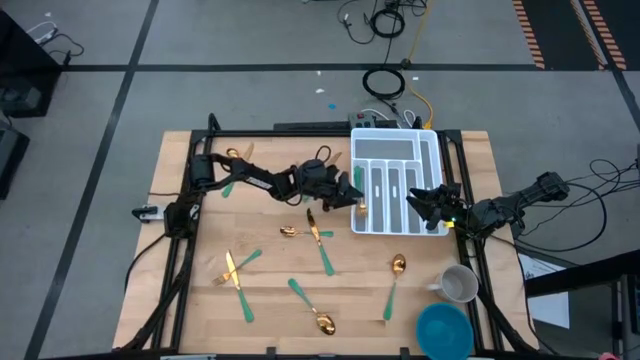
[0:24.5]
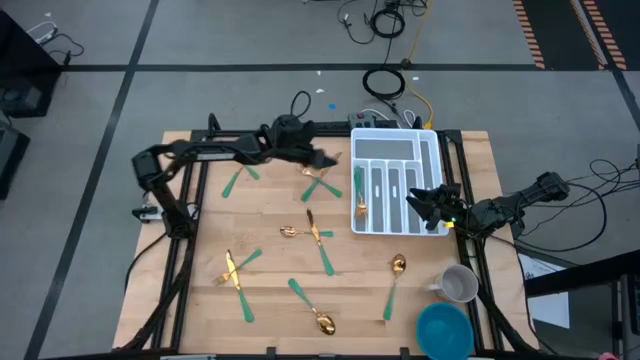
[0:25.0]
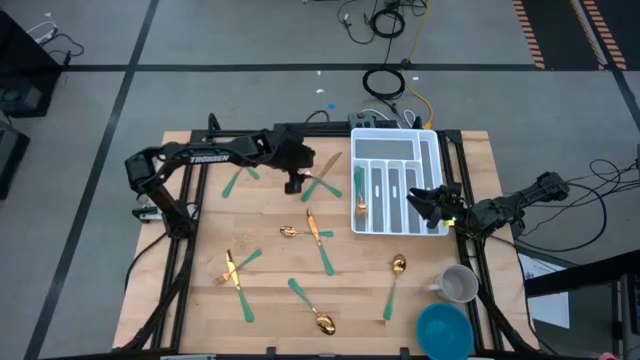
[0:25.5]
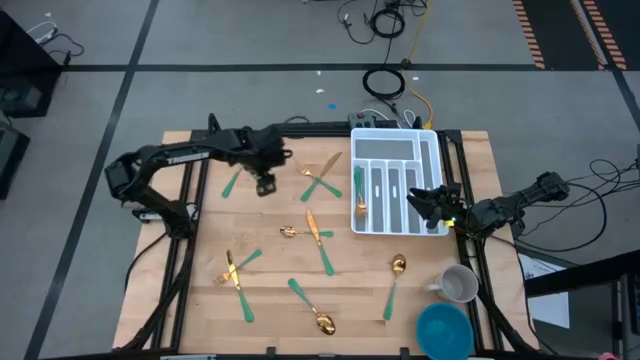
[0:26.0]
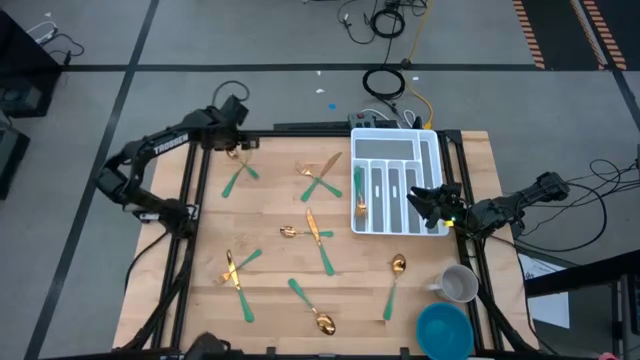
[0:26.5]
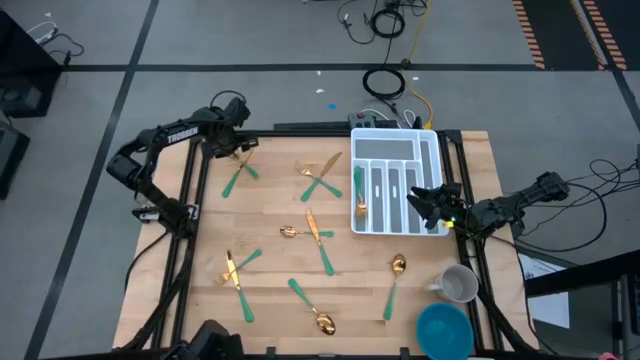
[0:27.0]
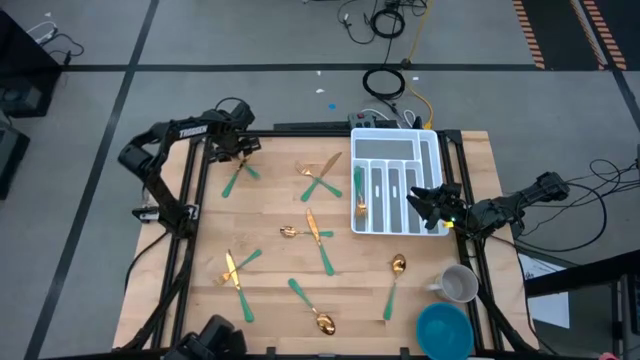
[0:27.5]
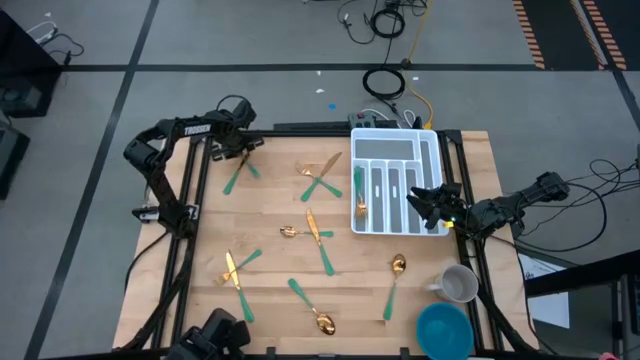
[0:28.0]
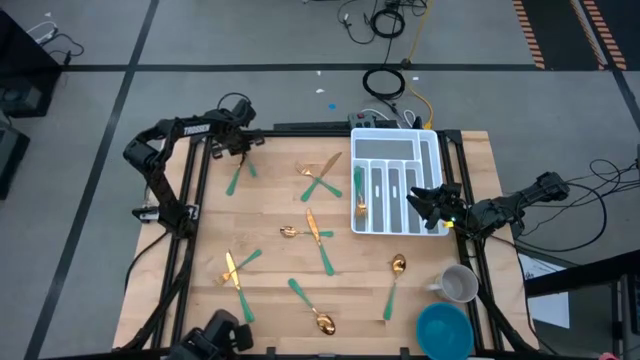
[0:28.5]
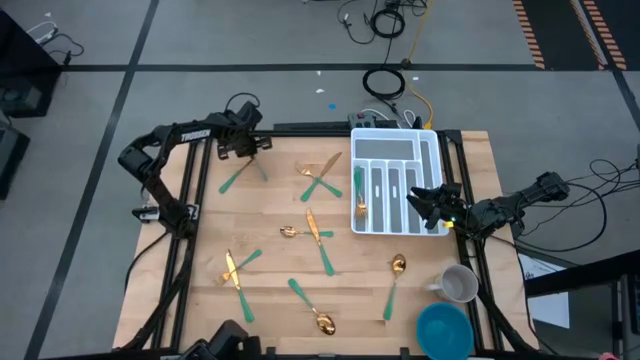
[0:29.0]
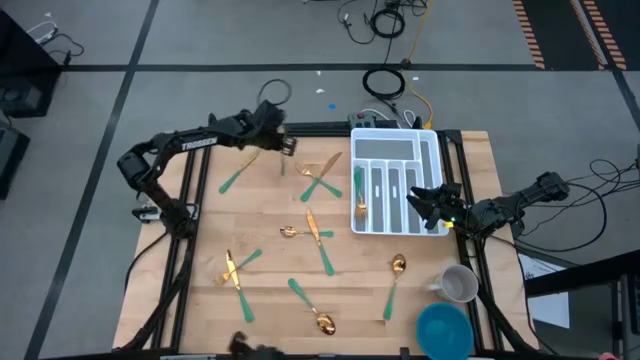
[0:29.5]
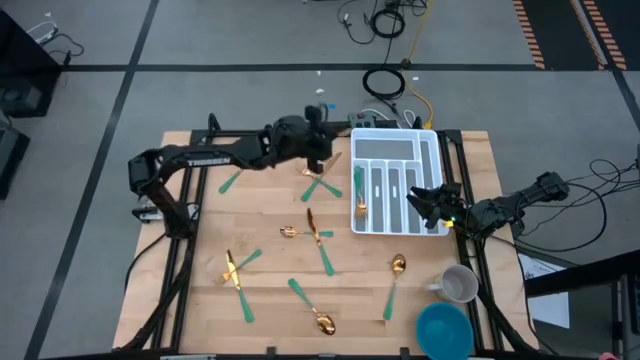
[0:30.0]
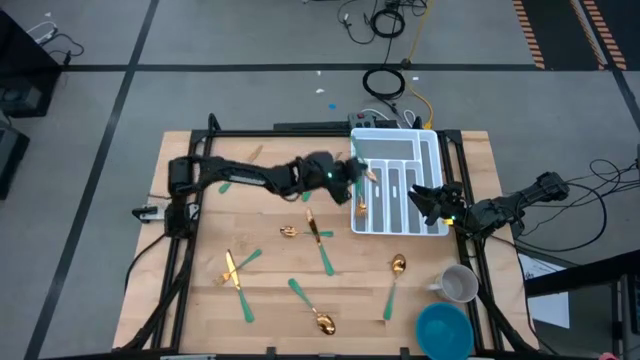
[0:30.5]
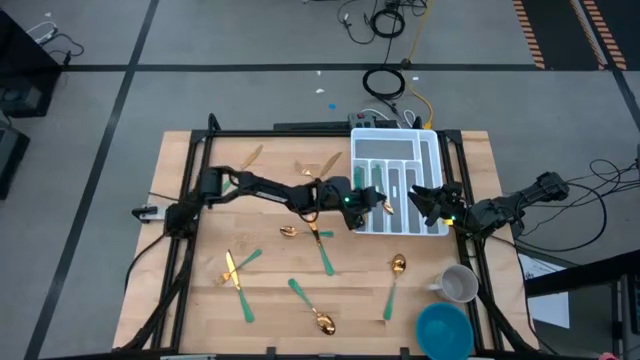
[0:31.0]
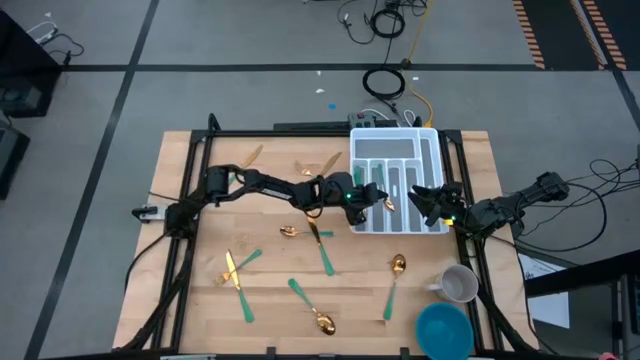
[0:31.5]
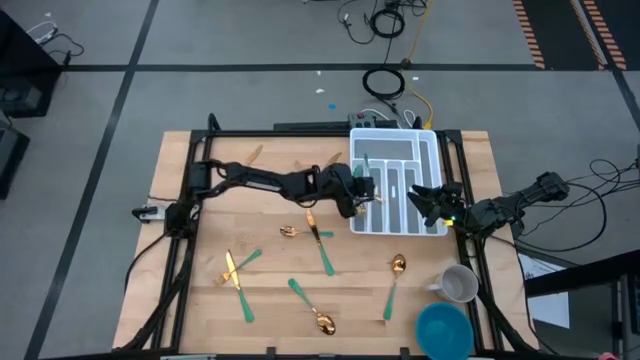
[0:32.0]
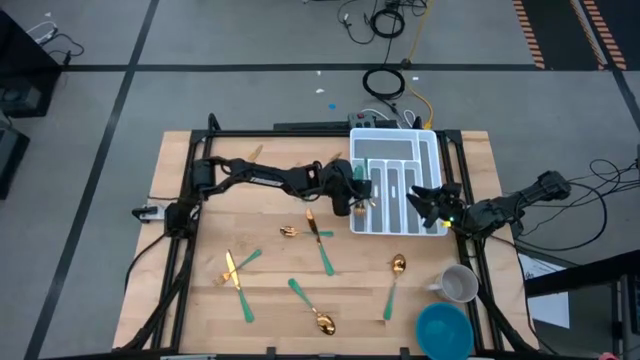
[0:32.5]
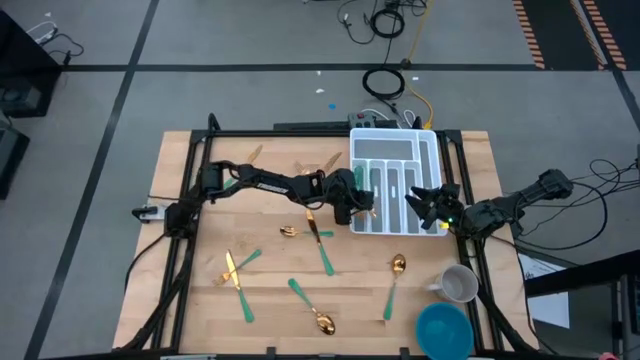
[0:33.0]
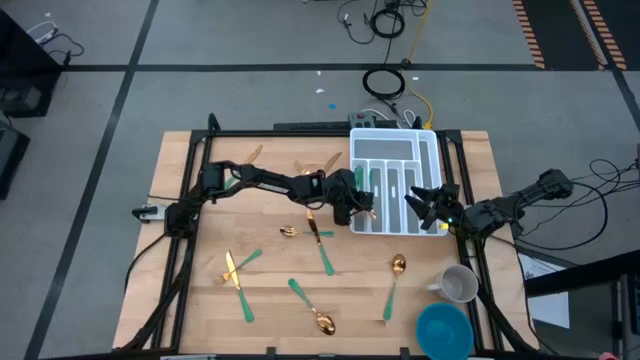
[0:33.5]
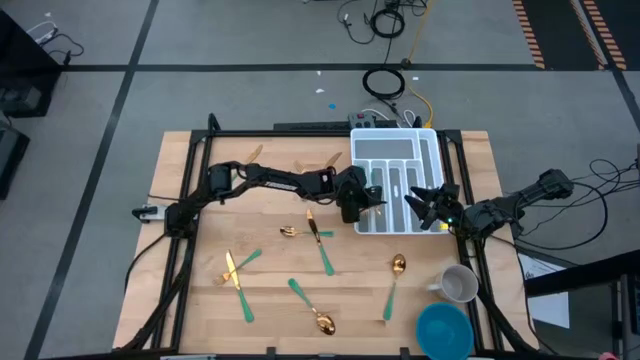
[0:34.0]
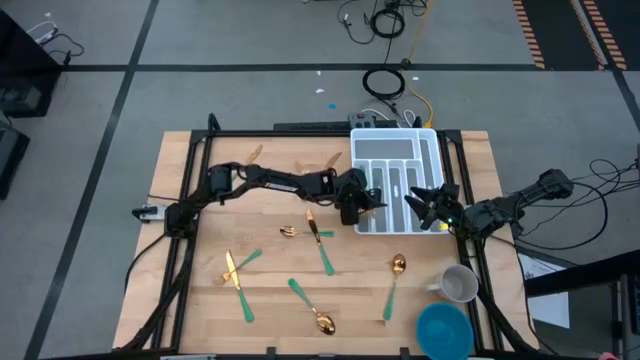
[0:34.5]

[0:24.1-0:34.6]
Task: Sort silverware
Put the spoon into the silverware tray

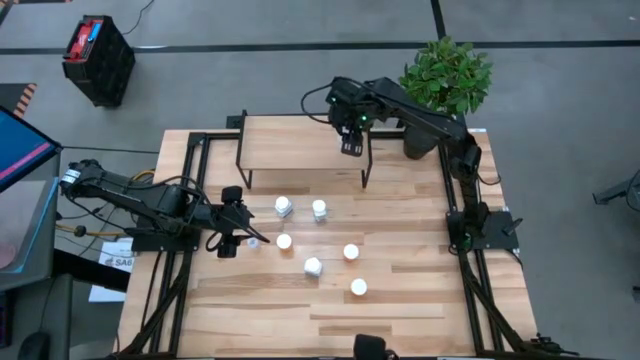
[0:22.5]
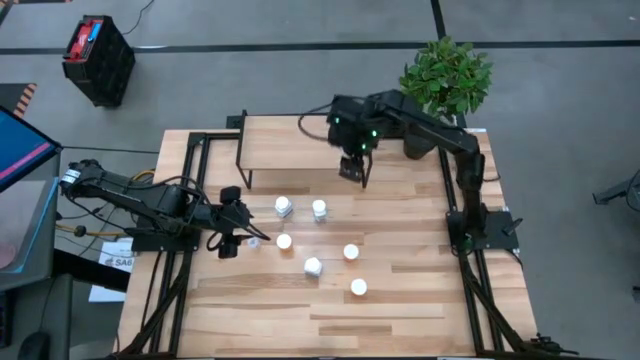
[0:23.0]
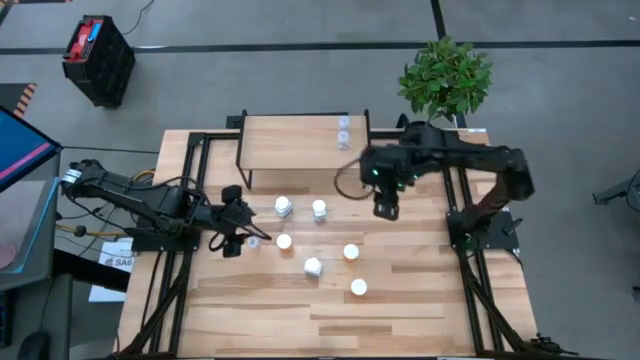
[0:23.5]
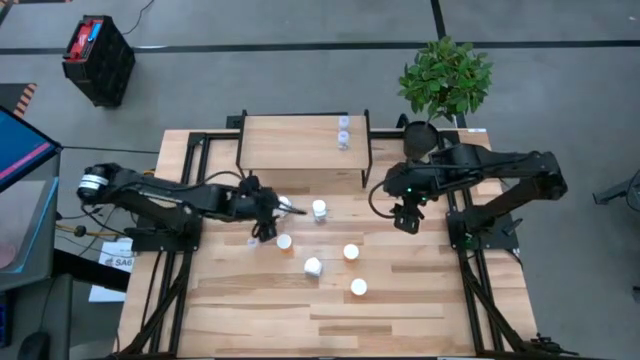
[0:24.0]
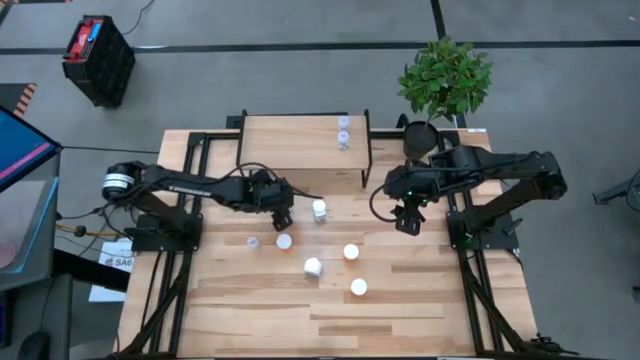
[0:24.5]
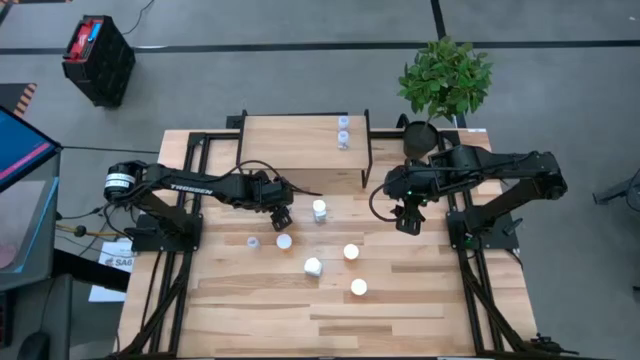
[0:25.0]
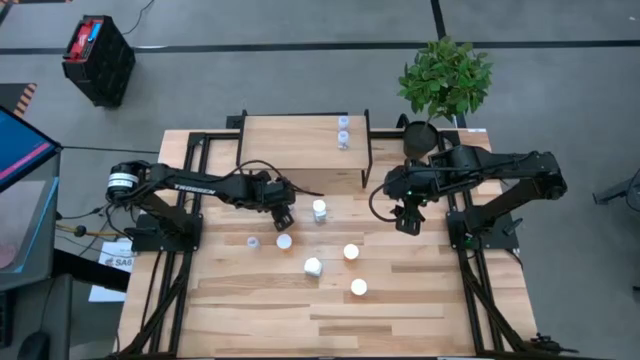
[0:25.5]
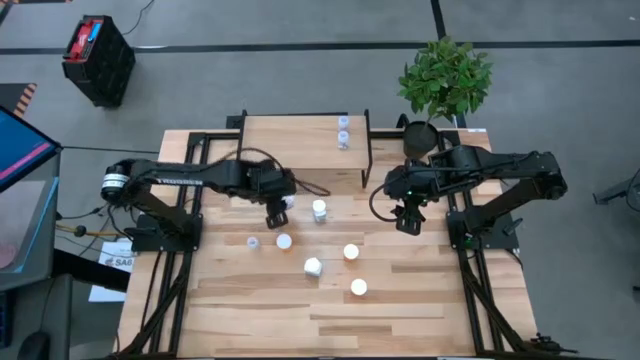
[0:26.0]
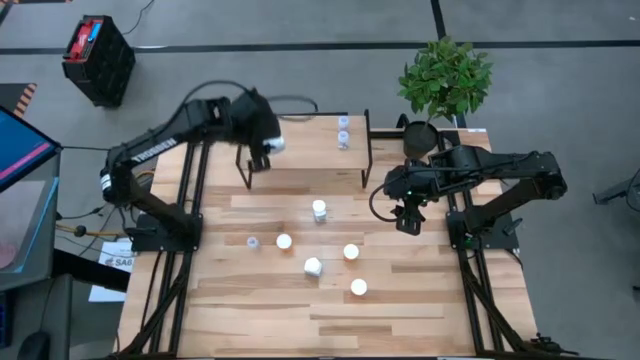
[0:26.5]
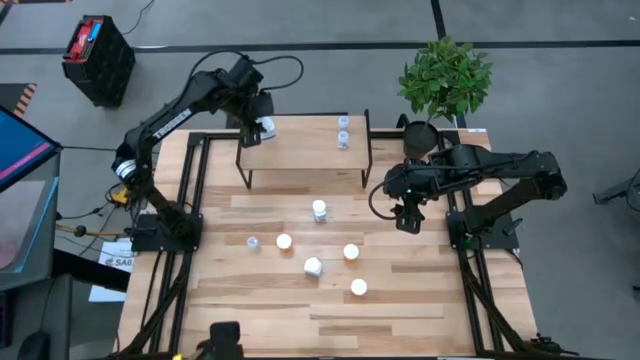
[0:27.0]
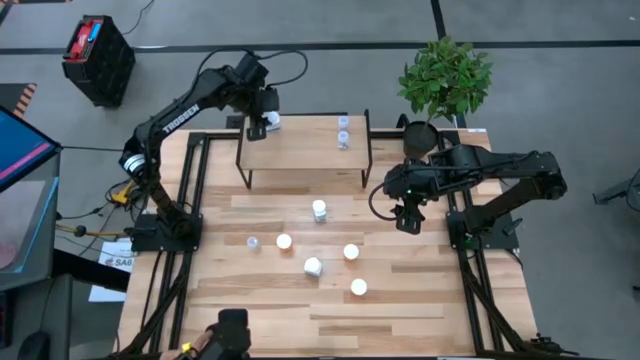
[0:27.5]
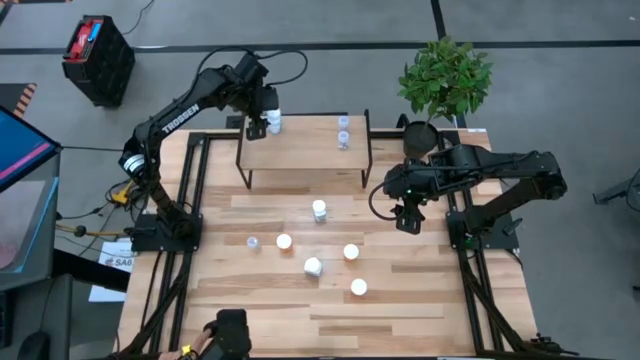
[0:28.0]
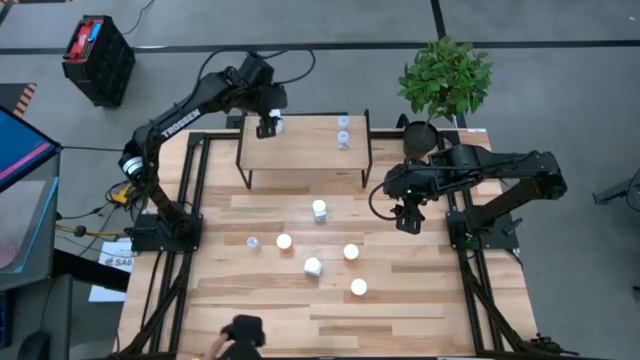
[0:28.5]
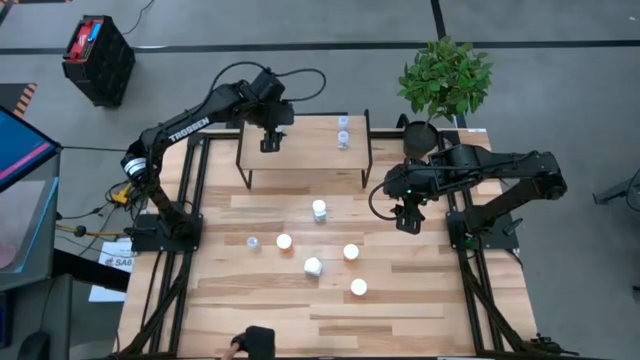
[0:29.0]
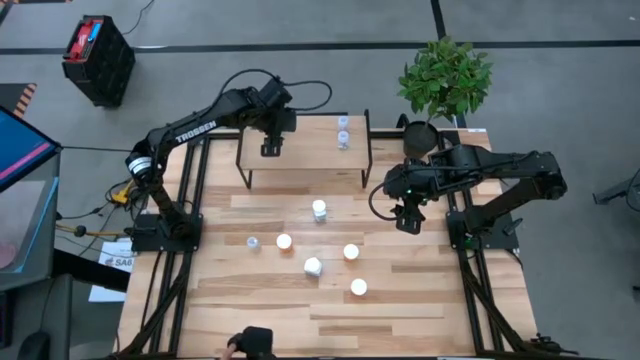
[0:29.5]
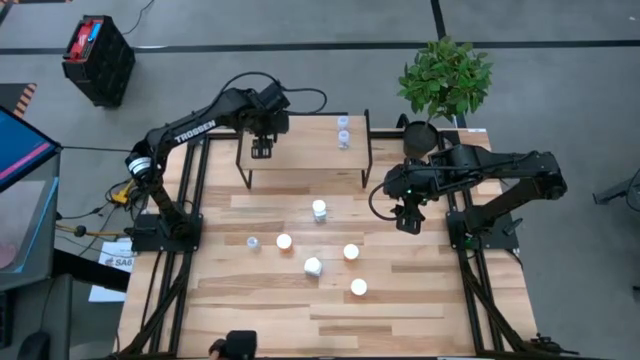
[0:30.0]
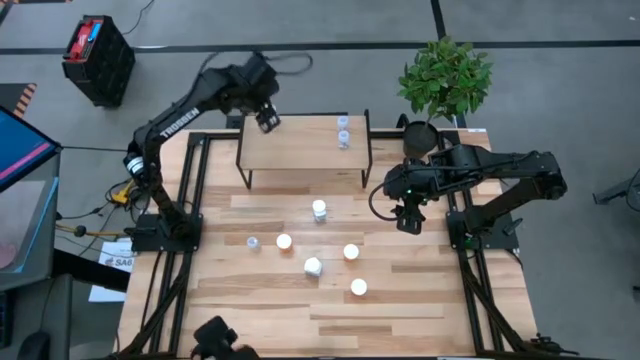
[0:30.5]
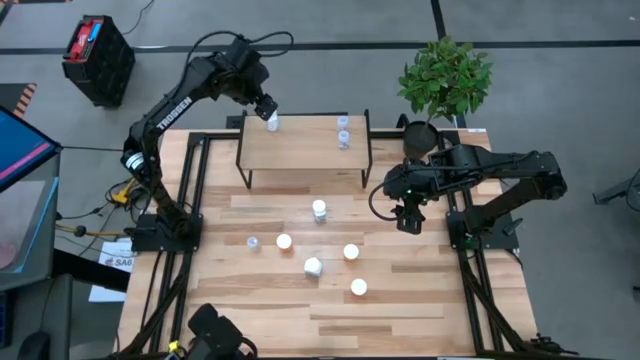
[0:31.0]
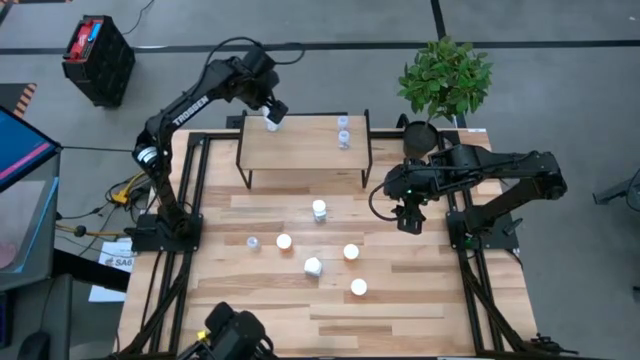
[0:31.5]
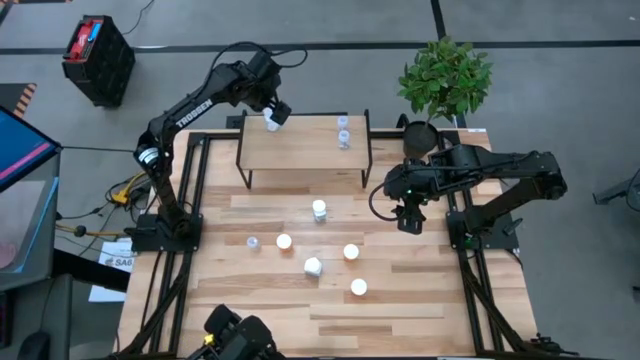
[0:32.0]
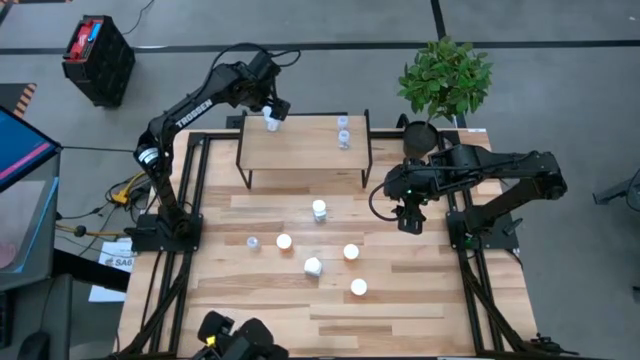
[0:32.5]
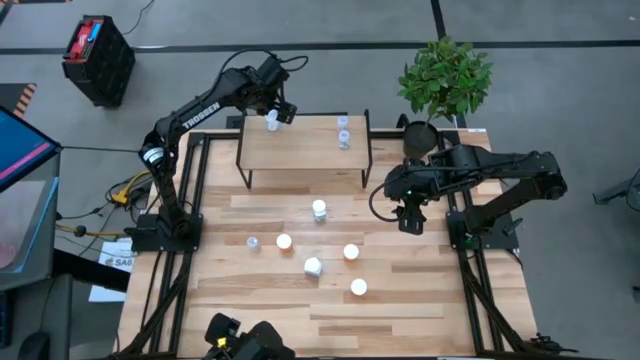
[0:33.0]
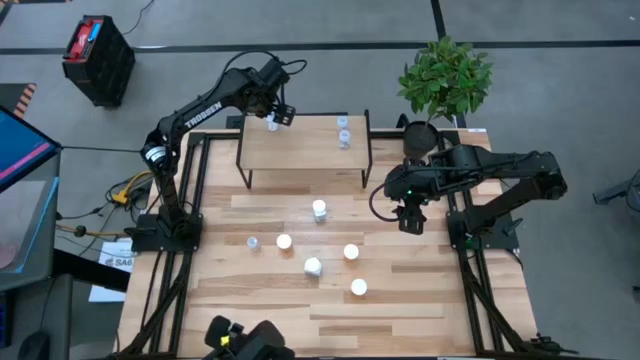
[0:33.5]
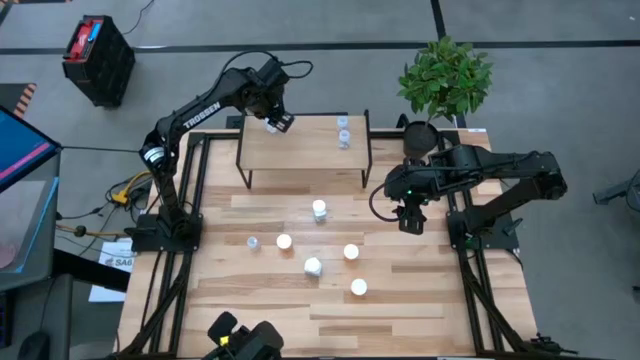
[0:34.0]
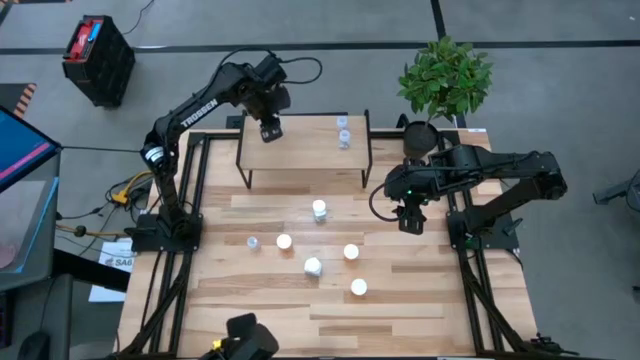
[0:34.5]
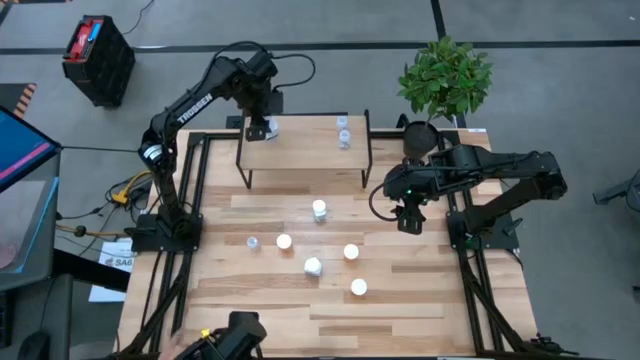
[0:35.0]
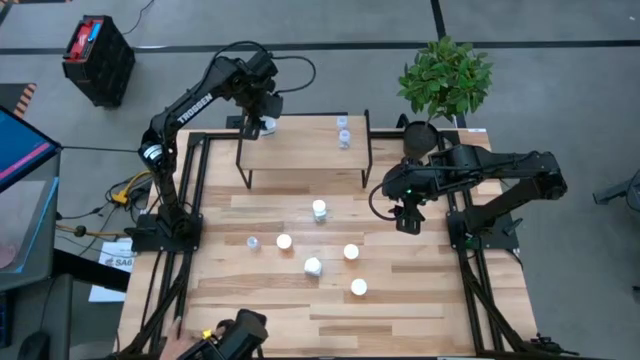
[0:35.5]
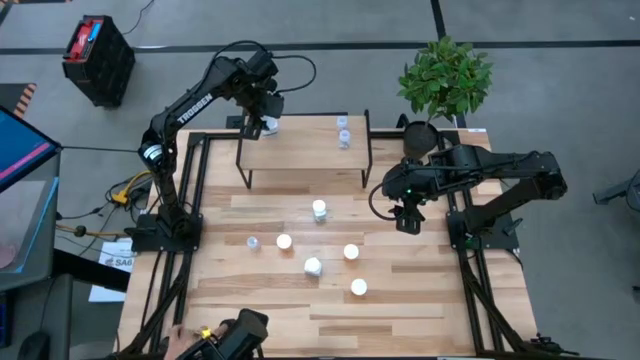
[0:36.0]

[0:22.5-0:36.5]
Task: Pick and place medicine bottles onto shelf by color
Put the top left white pill bottle on the shelf
